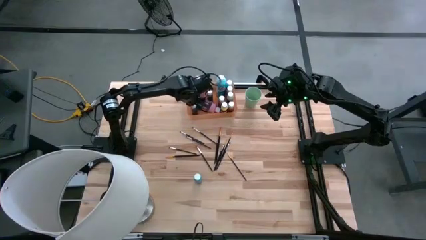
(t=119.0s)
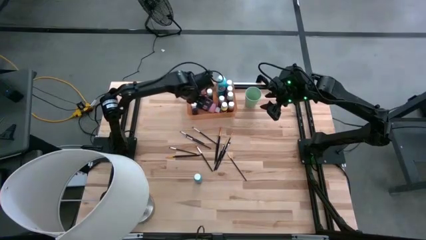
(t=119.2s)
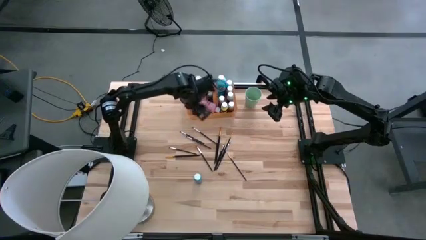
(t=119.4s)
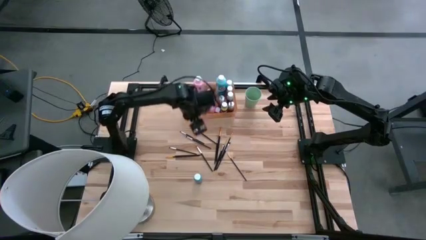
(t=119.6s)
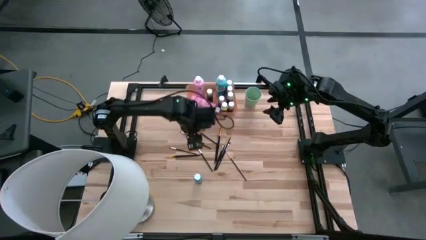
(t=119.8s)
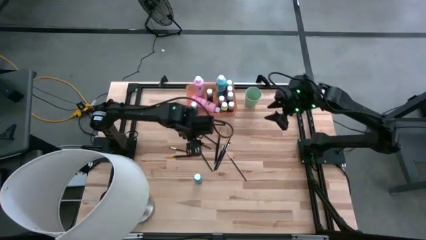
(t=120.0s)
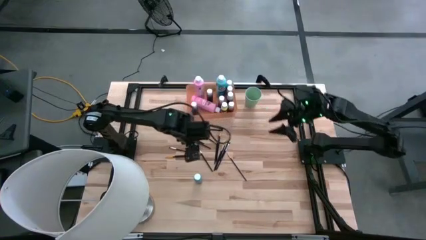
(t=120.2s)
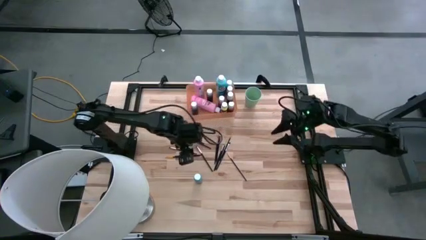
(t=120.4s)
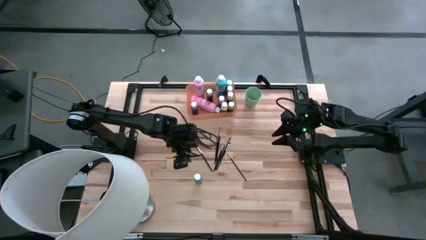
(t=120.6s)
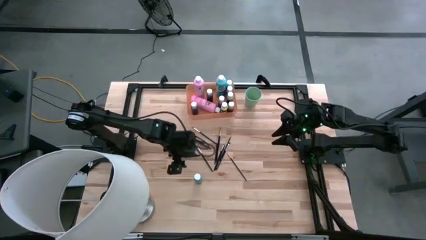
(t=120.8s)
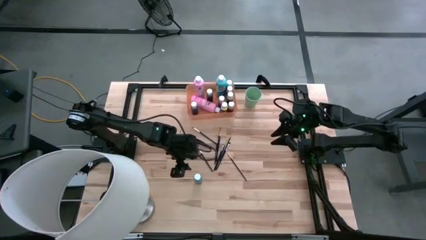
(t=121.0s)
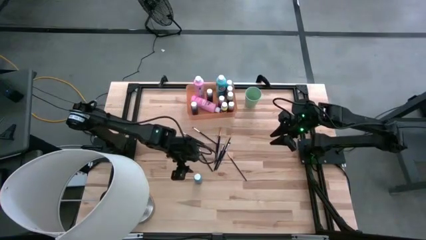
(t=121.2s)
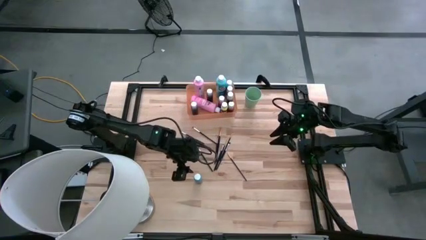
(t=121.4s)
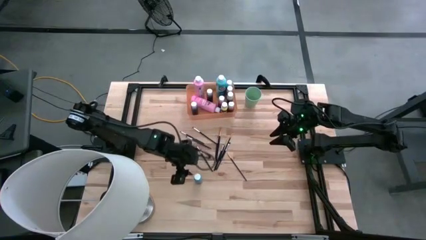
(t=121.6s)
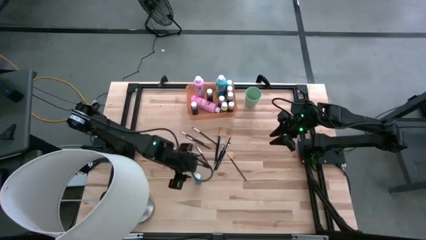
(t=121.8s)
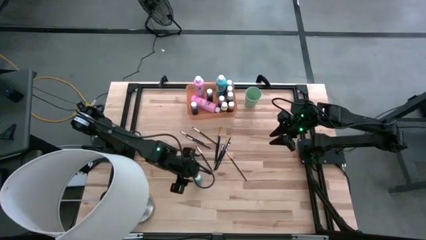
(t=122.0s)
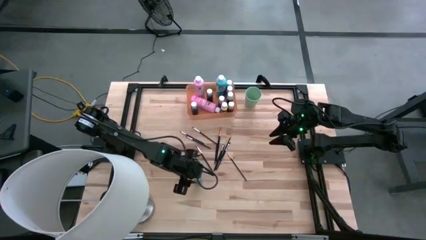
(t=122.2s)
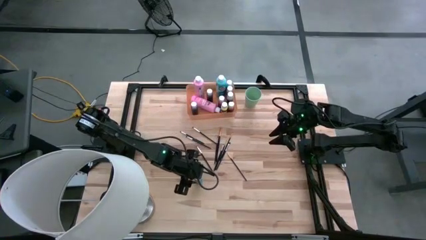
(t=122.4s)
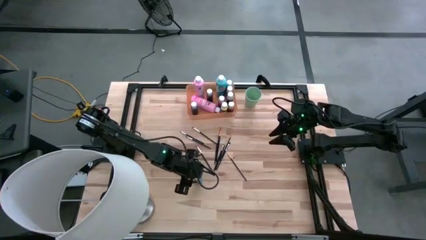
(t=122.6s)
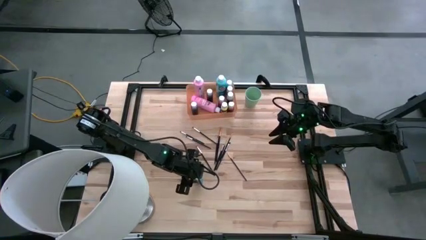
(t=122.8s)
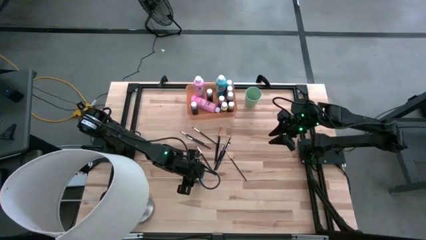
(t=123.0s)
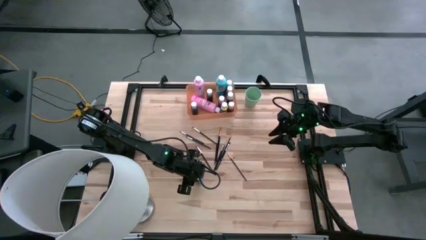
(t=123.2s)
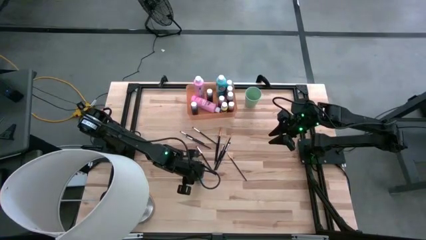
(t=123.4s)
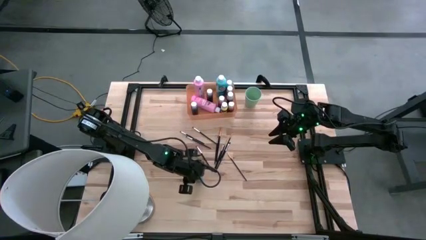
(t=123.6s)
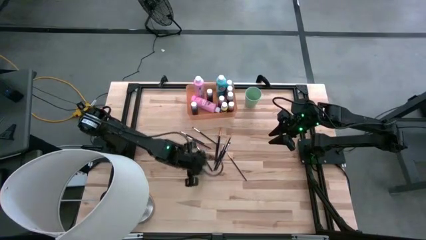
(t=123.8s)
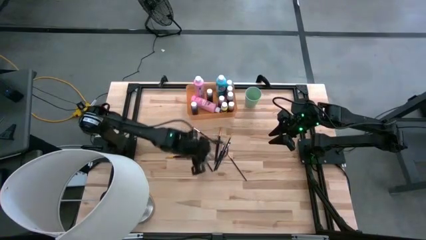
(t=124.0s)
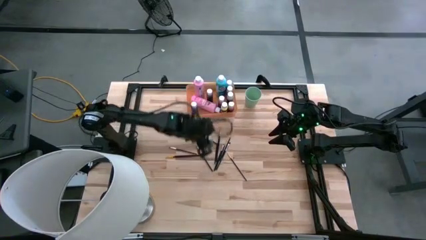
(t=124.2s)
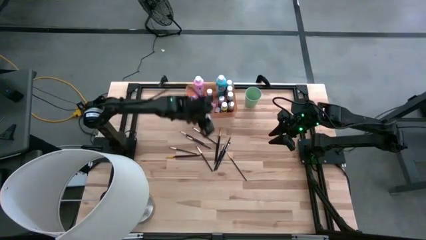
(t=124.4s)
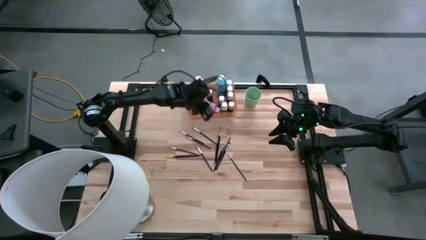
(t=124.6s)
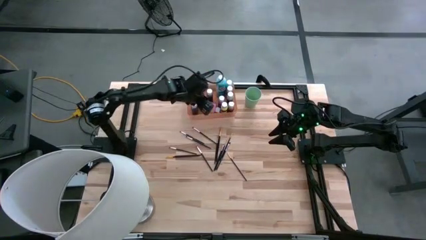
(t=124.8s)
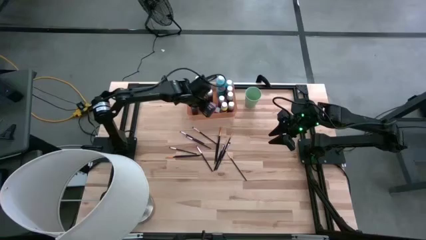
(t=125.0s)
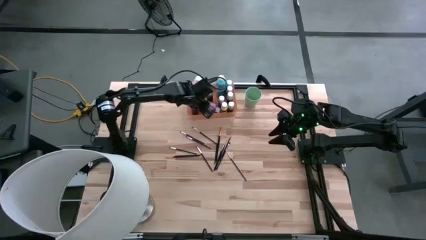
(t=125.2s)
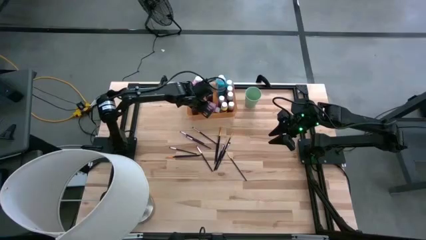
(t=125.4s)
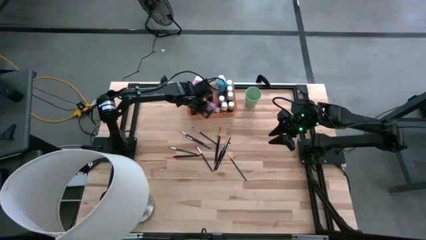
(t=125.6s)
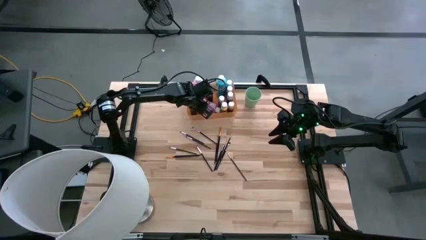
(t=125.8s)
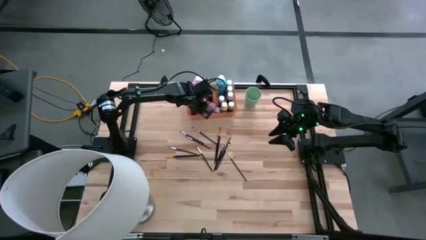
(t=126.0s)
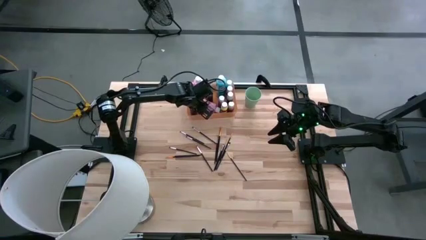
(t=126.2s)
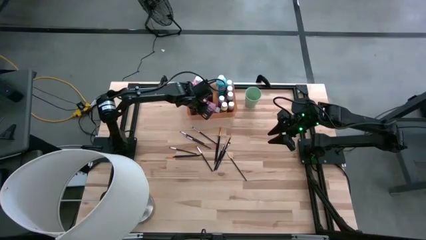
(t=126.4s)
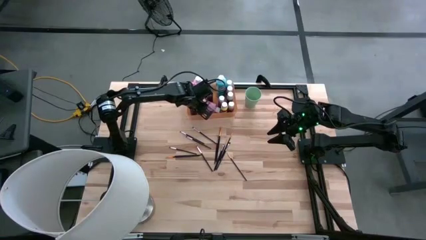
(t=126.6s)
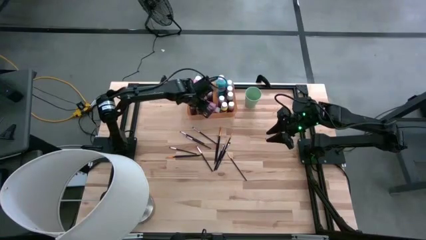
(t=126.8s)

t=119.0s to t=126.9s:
Task: Pick & Place Paint Supplies
Put the small blue paint bottle into the orange bin

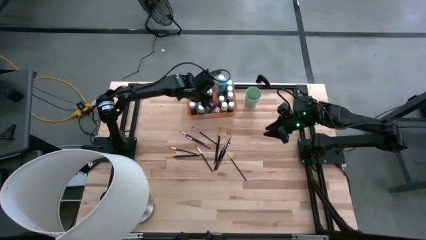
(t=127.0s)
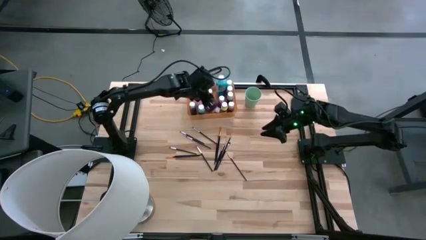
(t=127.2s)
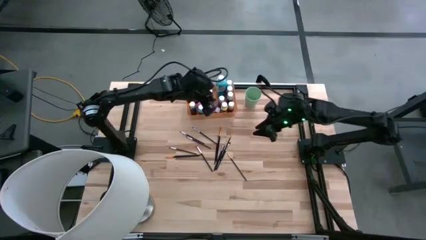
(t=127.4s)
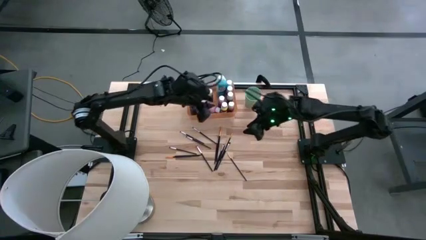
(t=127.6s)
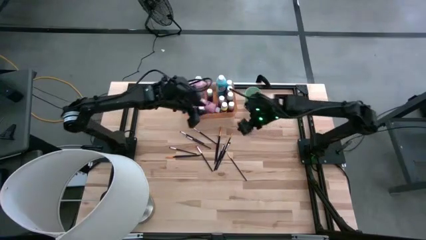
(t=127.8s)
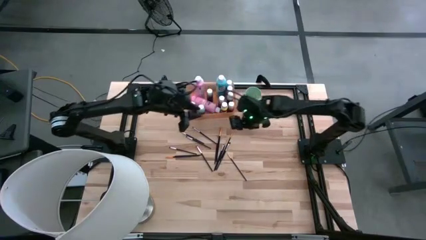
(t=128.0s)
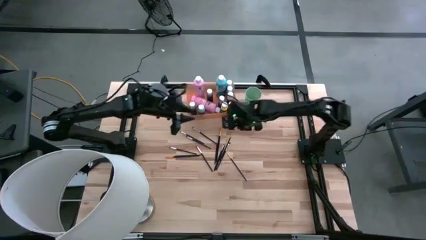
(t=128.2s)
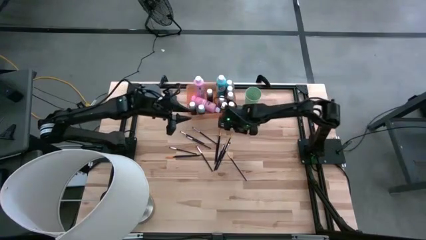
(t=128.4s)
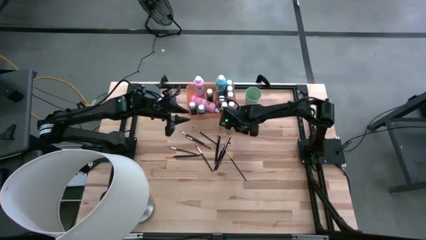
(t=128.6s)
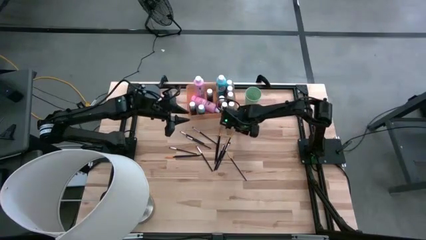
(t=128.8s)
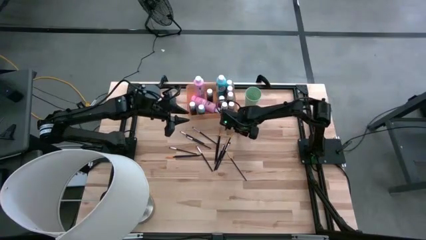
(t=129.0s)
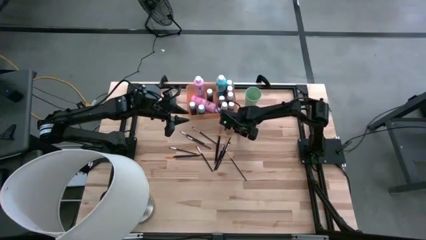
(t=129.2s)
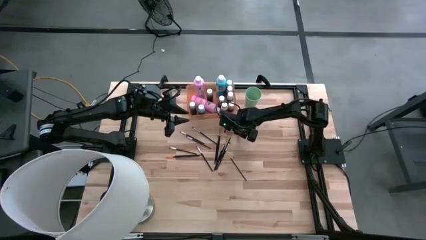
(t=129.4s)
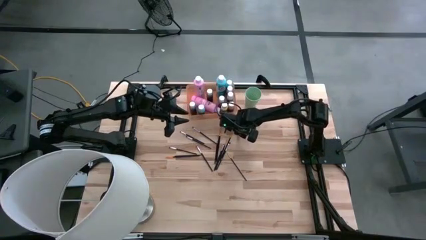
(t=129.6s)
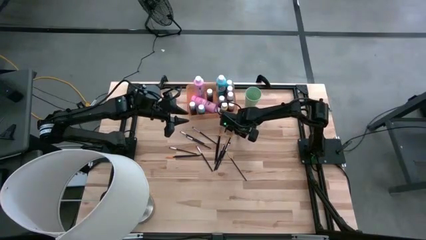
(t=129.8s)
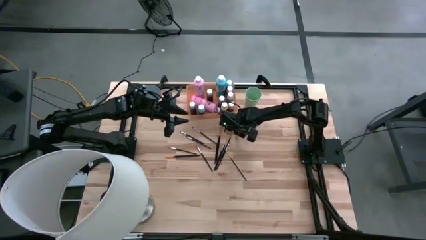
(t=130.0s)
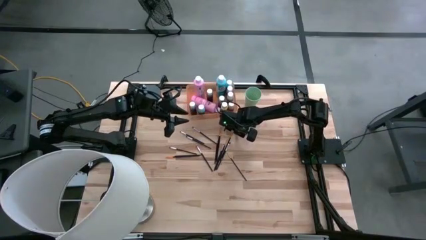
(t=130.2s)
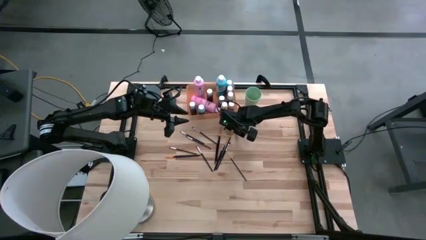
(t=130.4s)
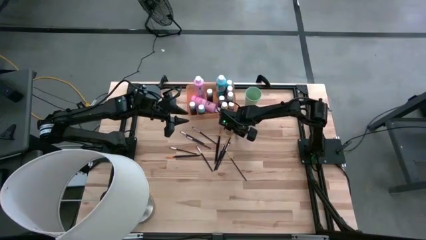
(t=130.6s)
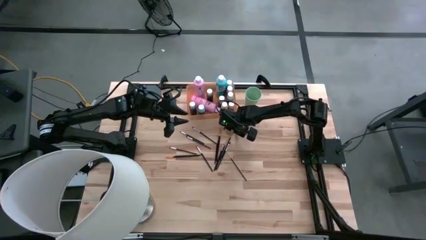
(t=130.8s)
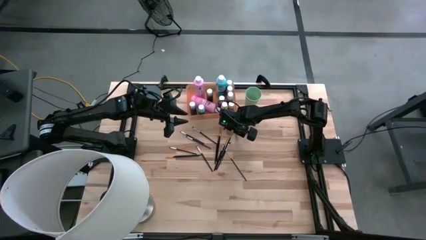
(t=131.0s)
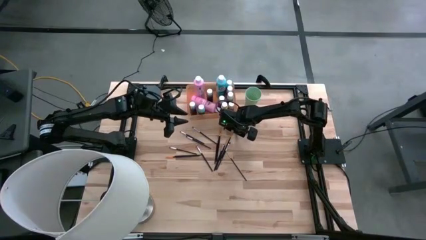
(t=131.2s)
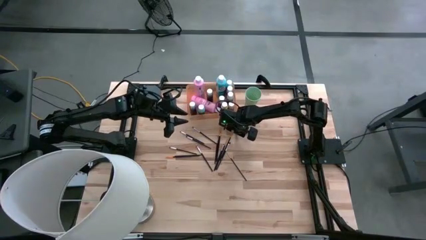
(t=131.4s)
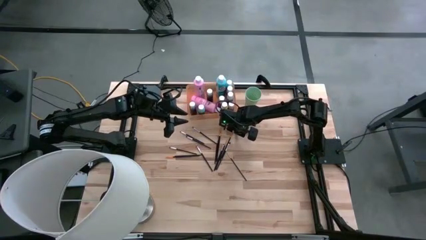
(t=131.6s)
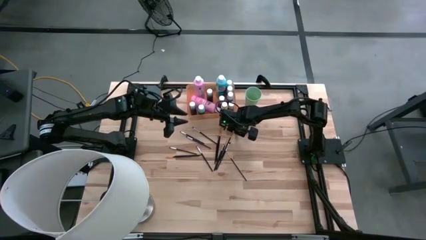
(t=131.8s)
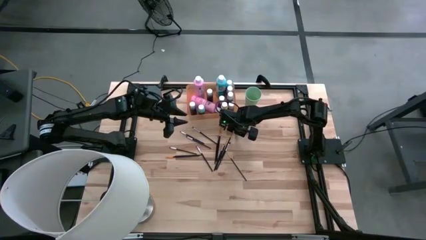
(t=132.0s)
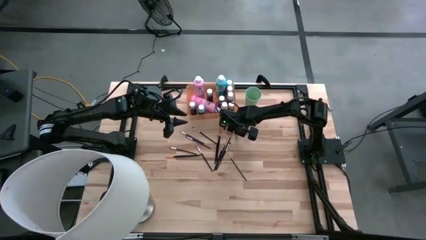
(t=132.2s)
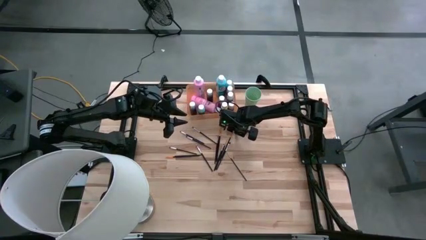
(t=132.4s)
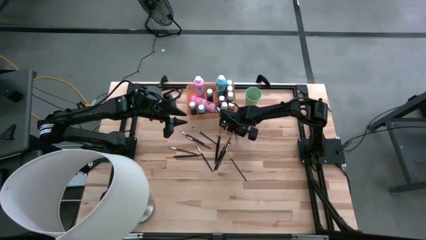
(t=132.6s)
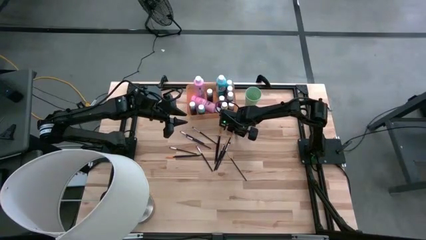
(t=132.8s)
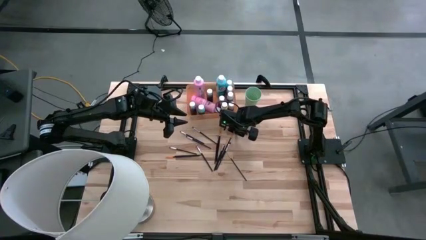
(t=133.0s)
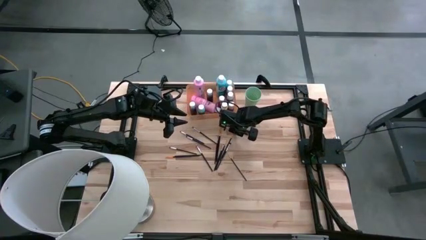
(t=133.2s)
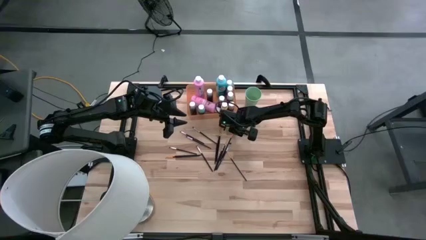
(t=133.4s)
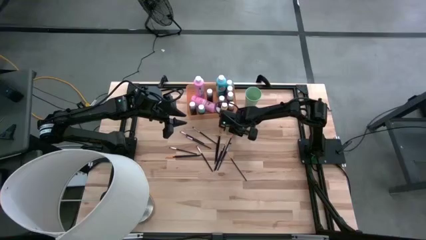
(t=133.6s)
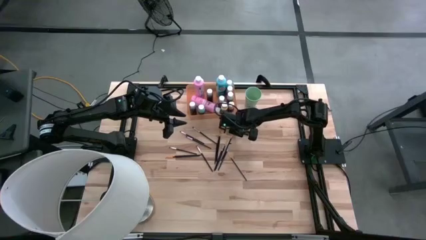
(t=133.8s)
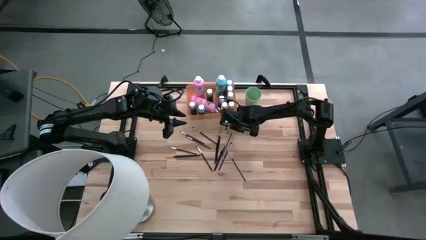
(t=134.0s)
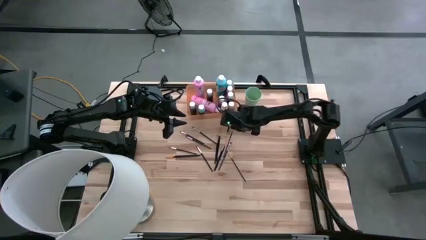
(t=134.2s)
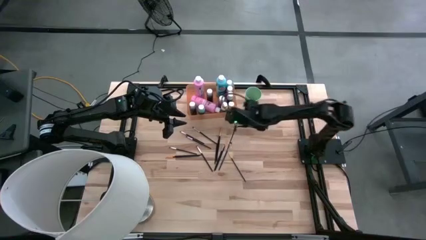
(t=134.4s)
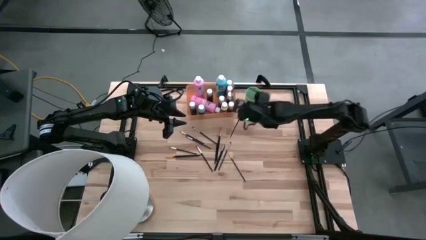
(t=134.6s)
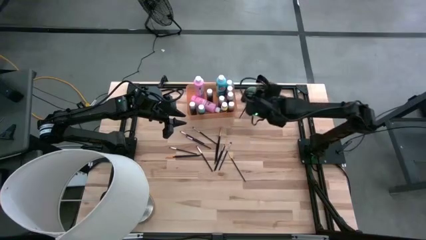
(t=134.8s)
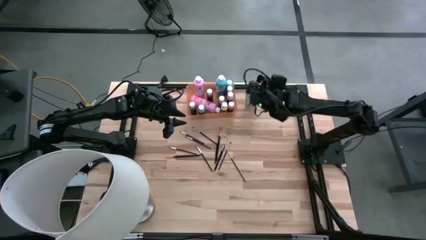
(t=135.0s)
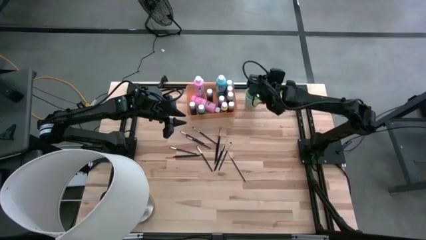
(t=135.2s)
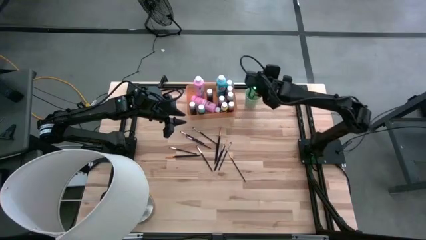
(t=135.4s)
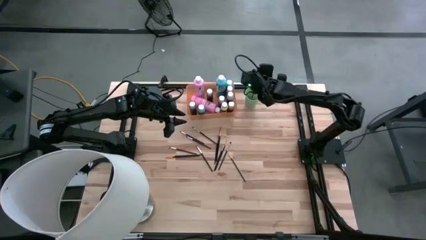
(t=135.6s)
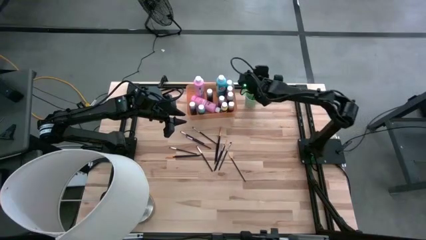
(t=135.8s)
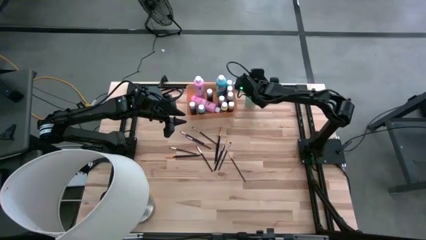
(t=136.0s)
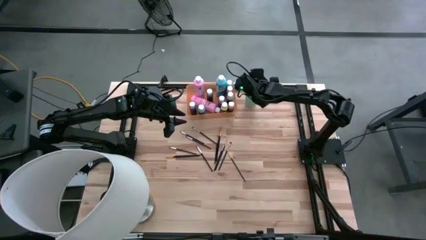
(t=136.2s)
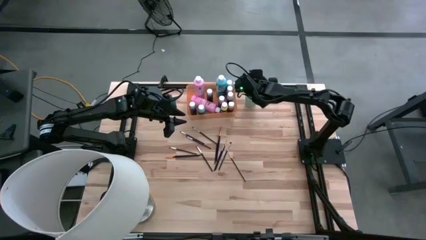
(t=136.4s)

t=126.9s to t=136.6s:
Put the gold paint brush into the green cup
